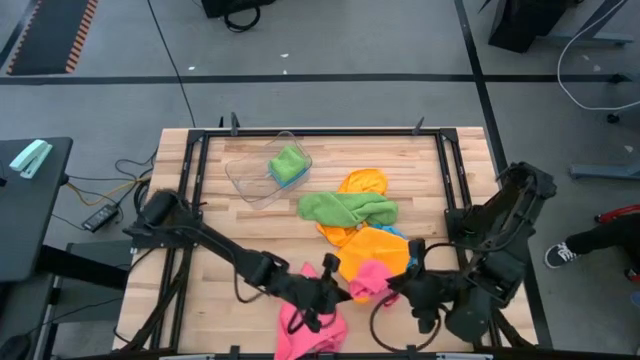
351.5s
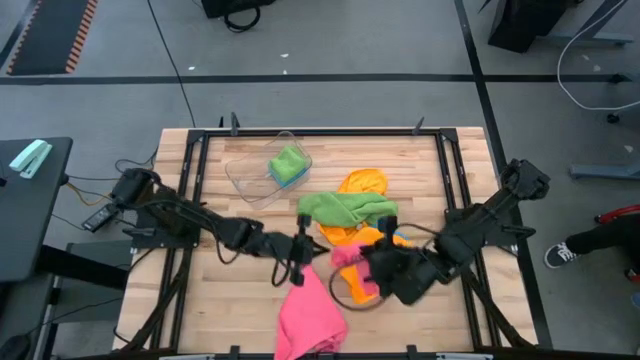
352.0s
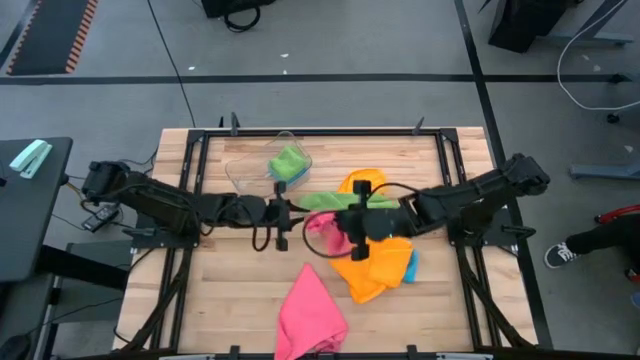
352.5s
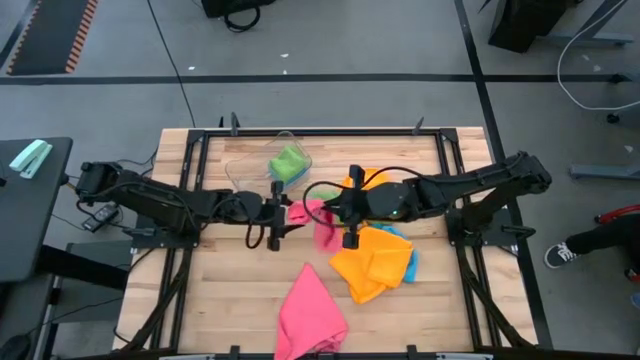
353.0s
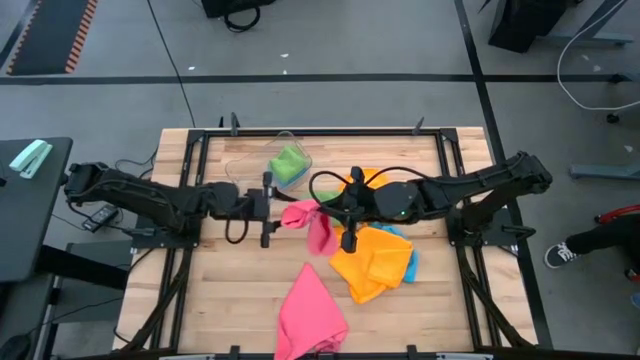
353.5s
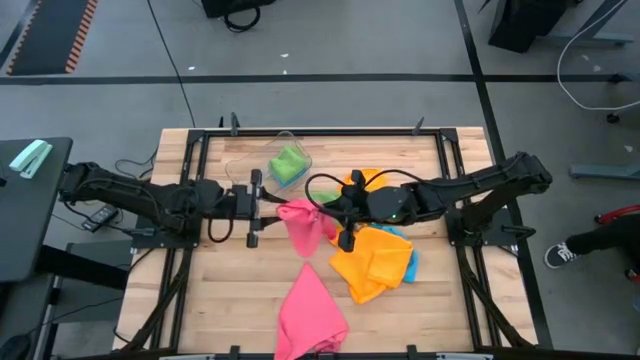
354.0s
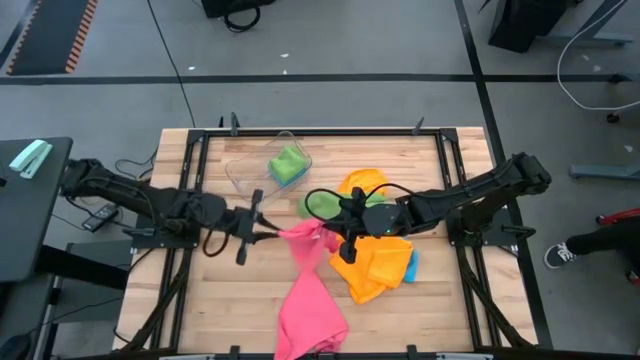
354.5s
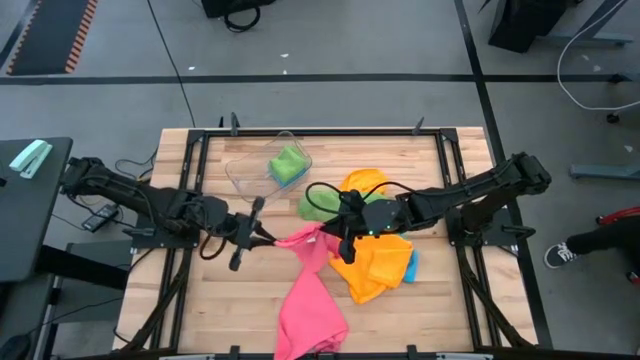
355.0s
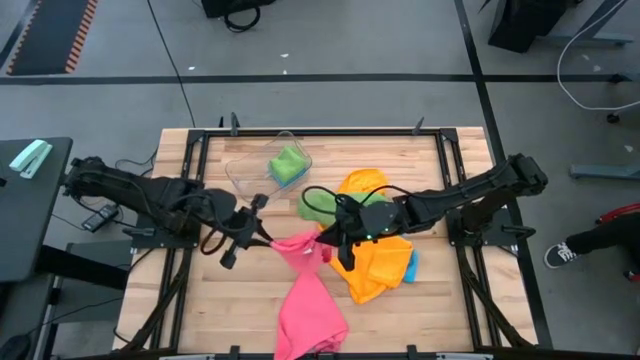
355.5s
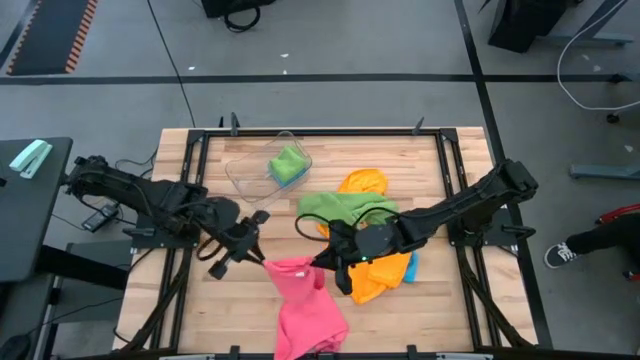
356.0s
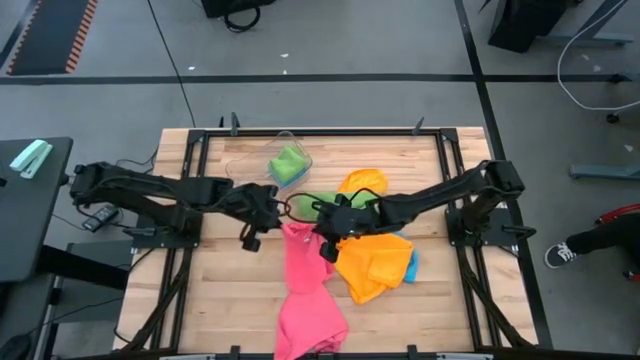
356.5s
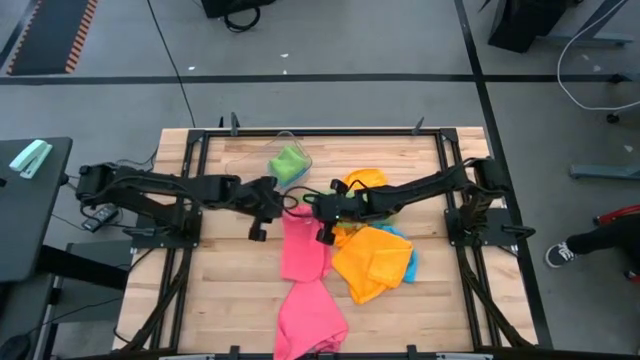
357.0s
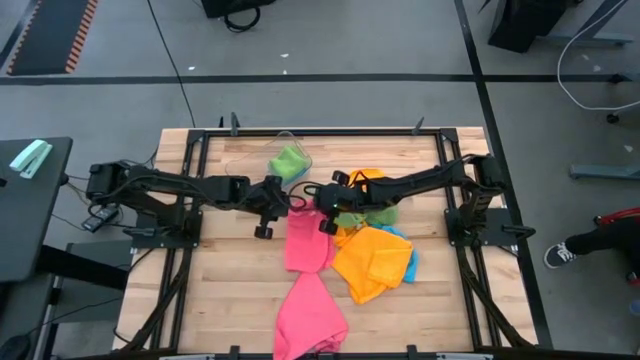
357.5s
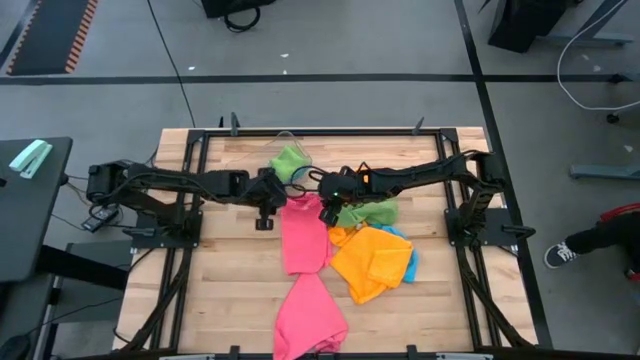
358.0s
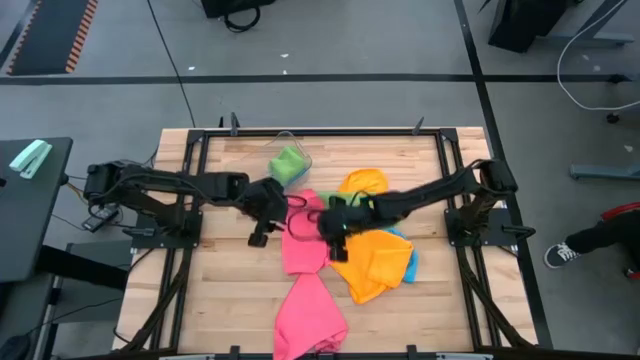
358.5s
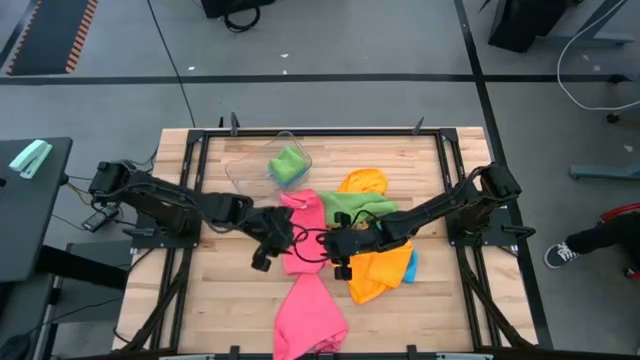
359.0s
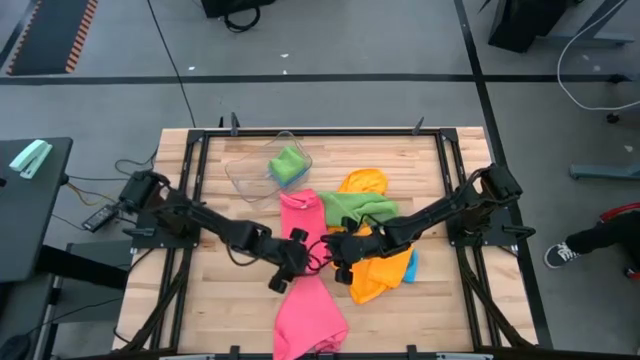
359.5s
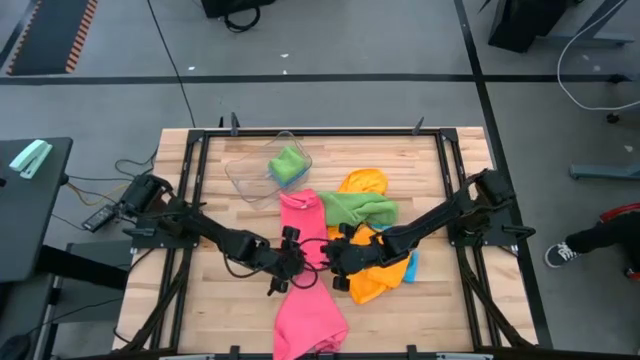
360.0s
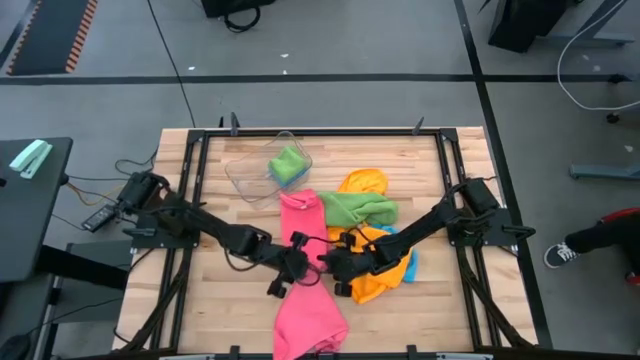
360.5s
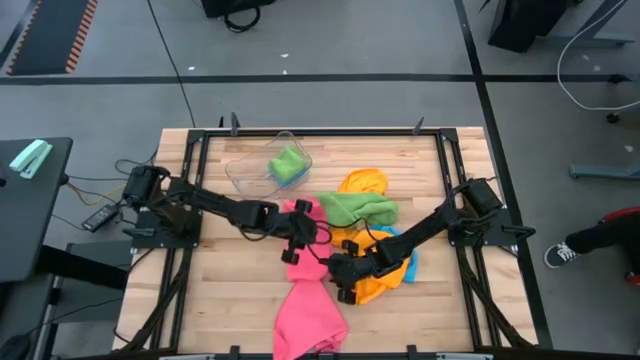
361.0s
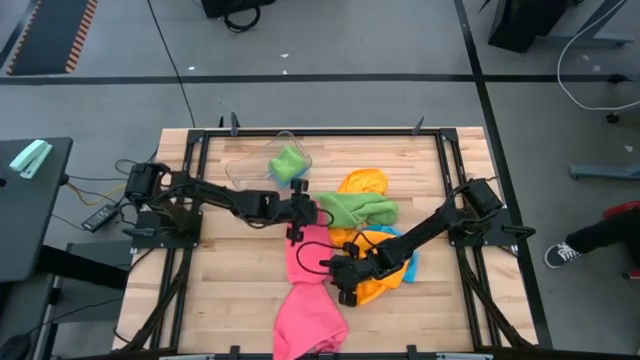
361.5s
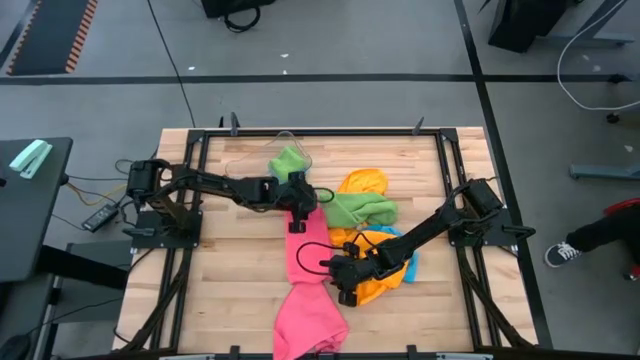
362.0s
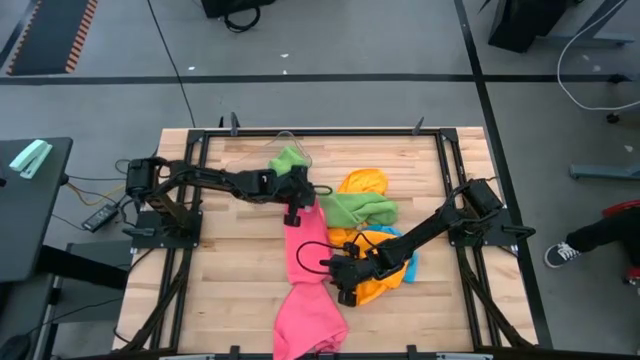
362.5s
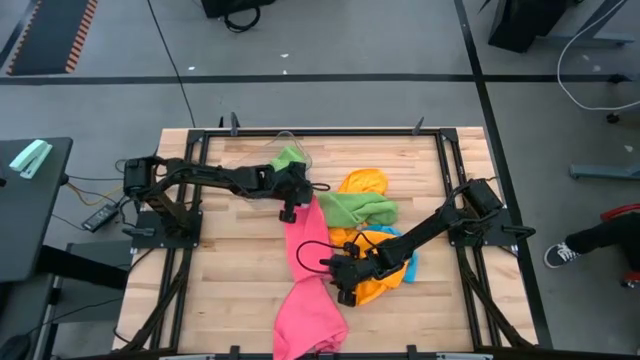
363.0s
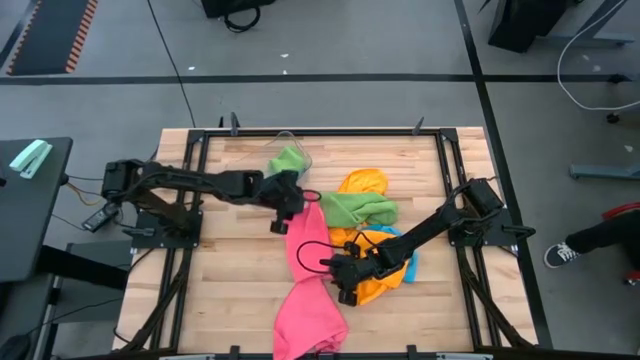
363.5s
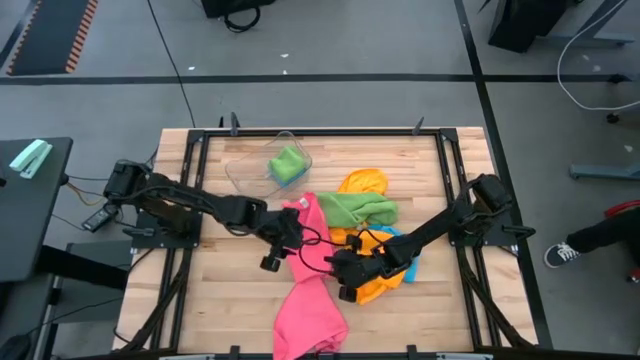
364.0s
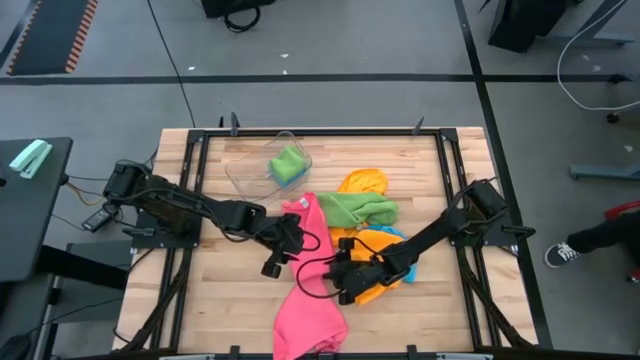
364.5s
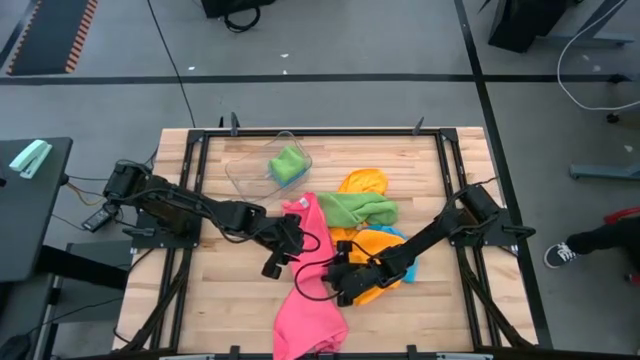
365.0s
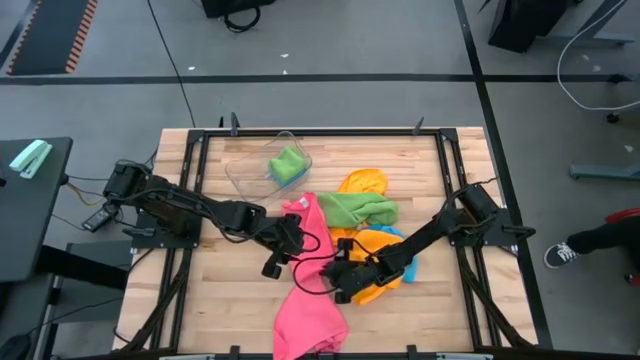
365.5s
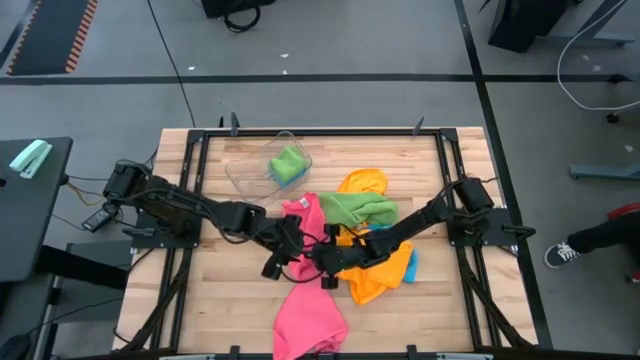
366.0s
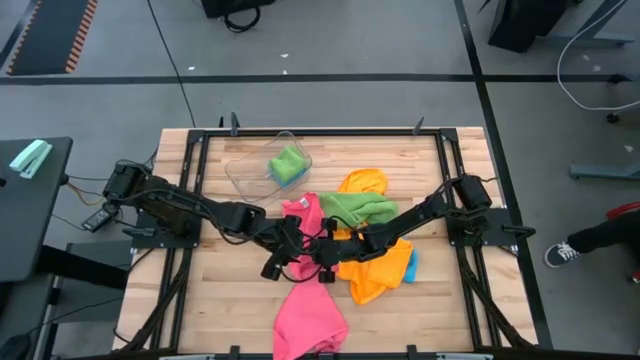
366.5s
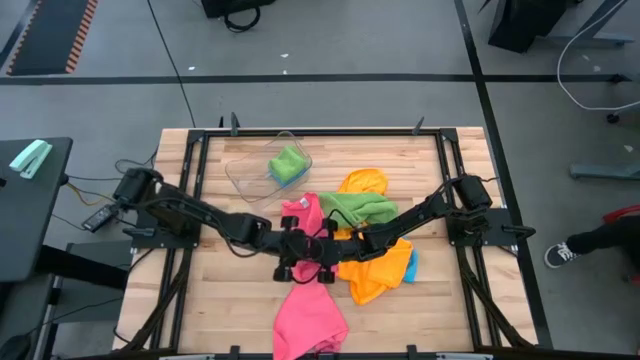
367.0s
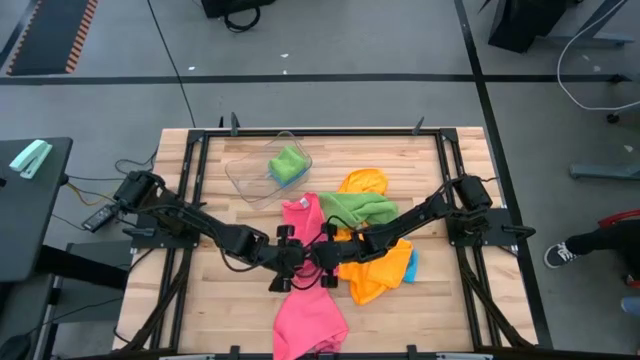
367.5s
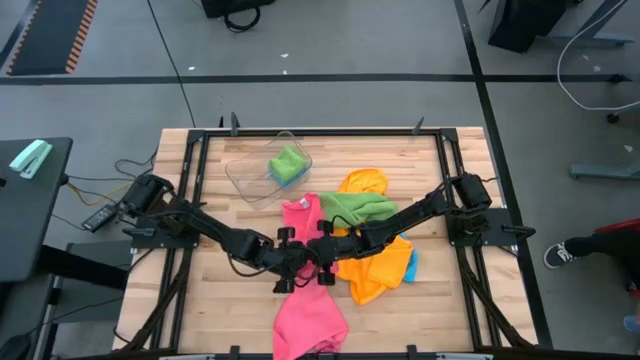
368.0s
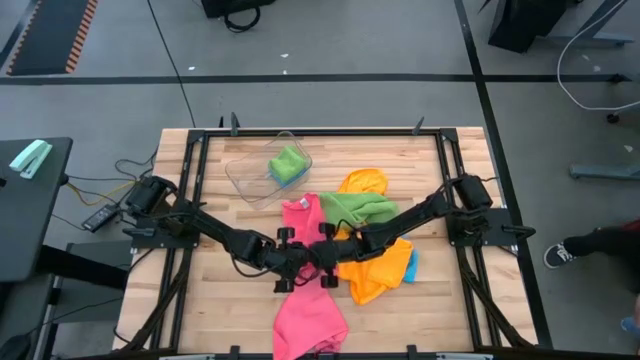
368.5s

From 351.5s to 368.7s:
Task: Fold microfiber towels
Fold the left pink microfiber towel

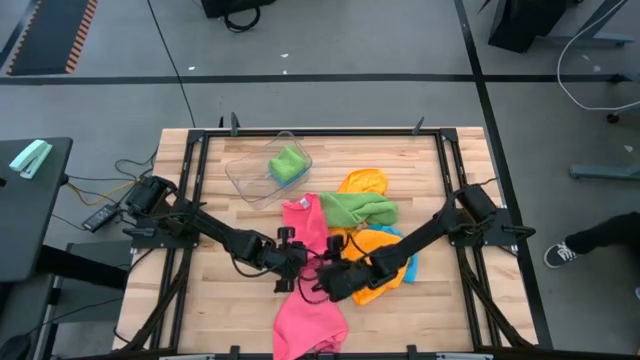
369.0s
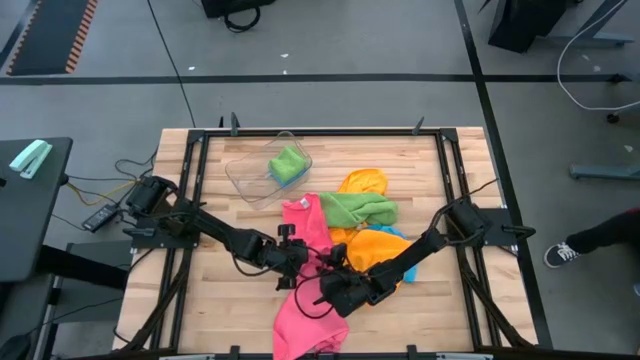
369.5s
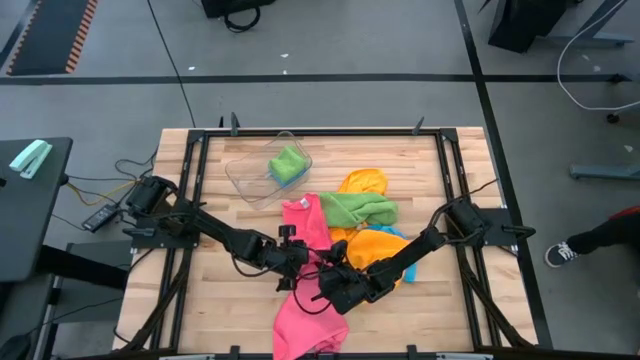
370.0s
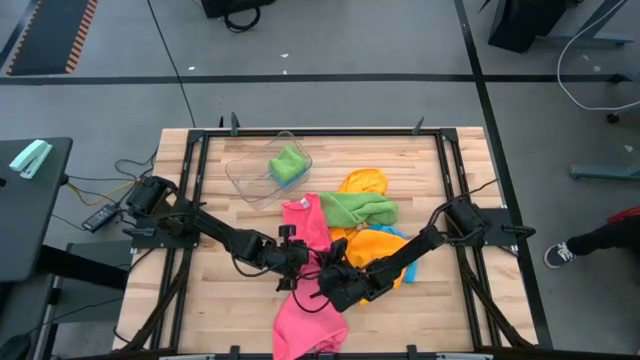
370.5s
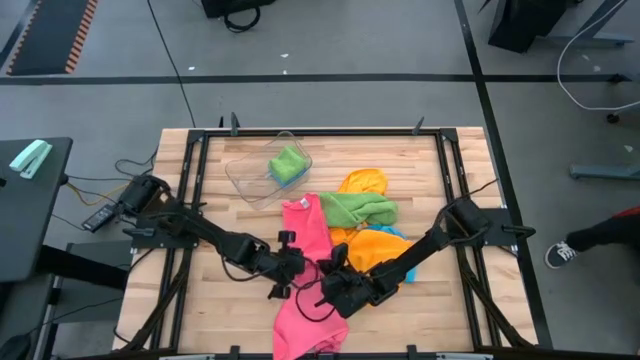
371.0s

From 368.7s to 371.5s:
Fold the left pink microfiber towel

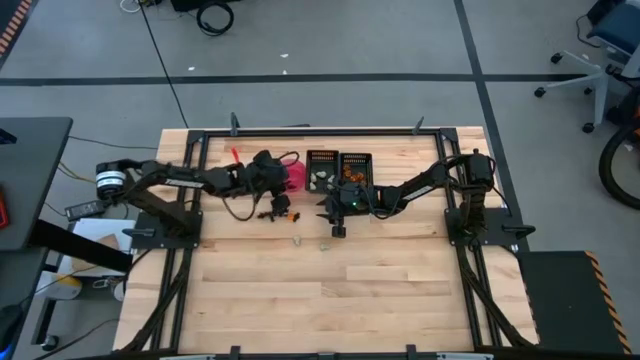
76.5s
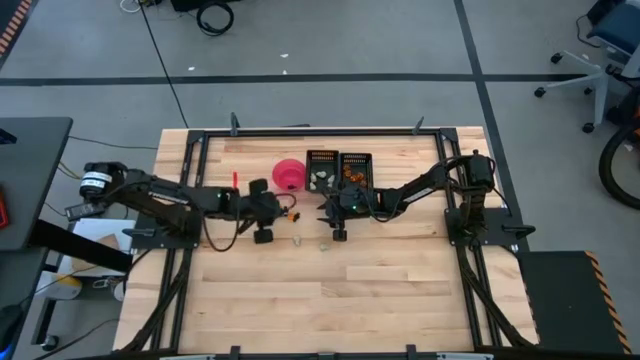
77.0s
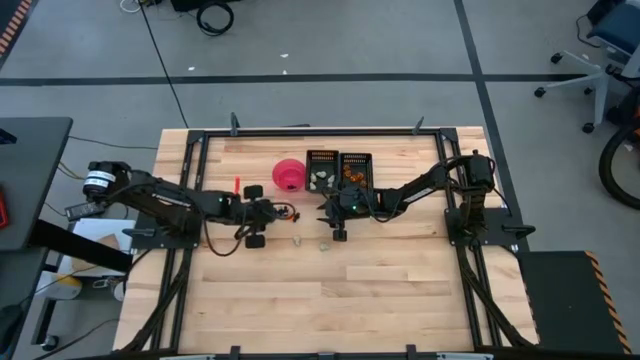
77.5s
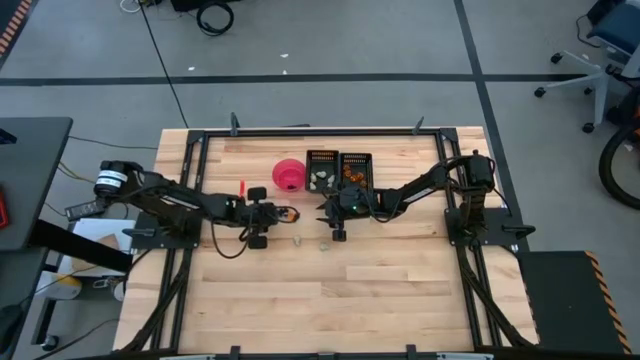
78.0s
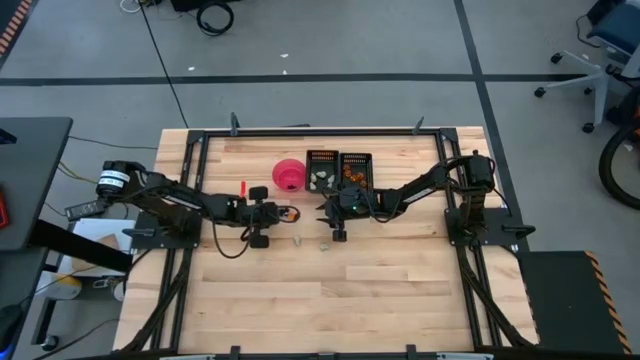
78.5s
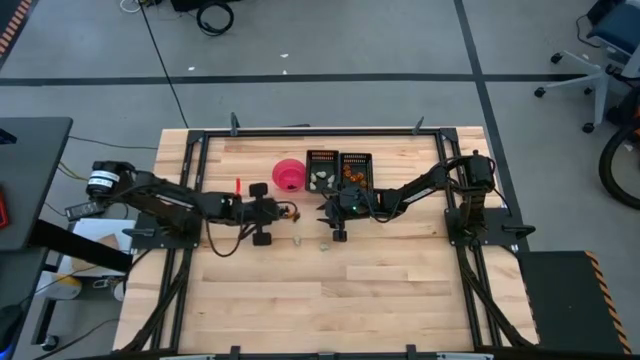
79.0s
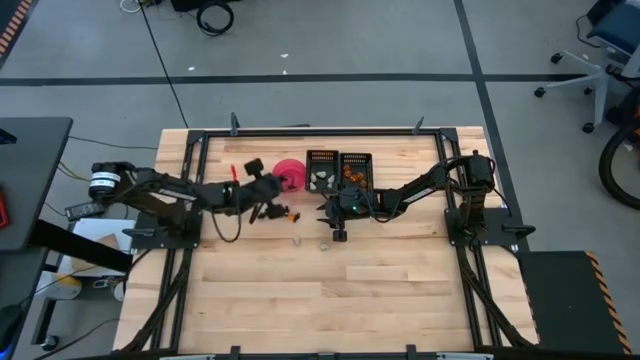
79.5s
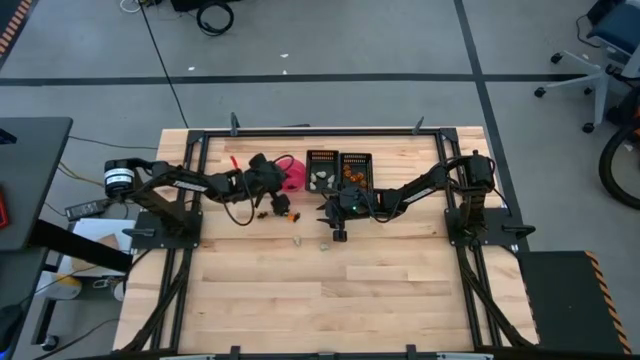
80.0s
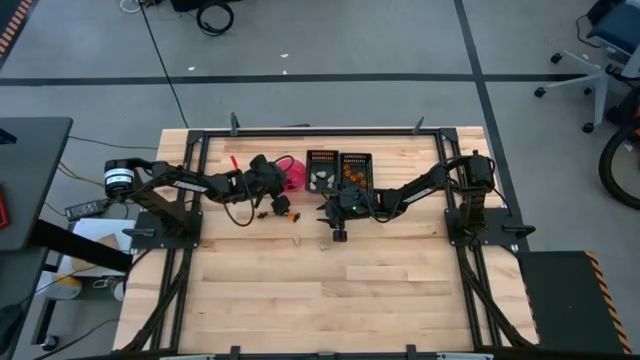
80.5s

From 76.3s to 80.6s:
Task: Sort Halloween decoration
Put the black skeleton toy into the red bowl
